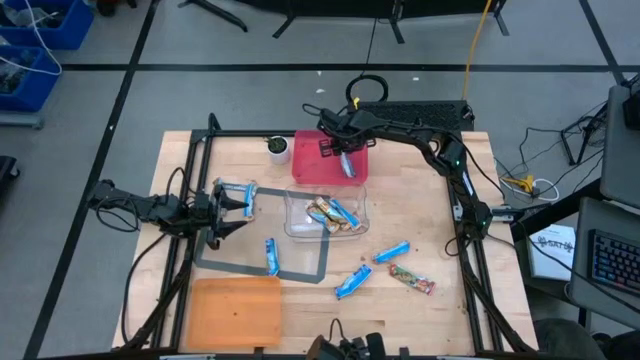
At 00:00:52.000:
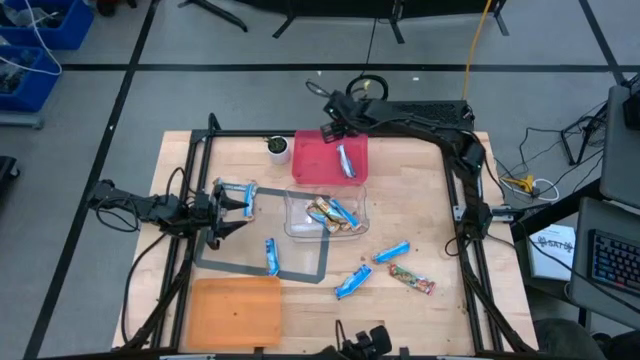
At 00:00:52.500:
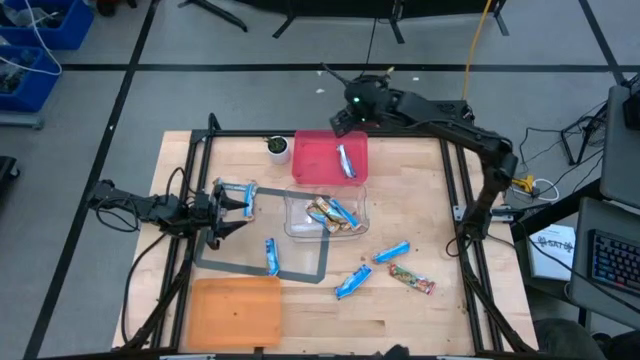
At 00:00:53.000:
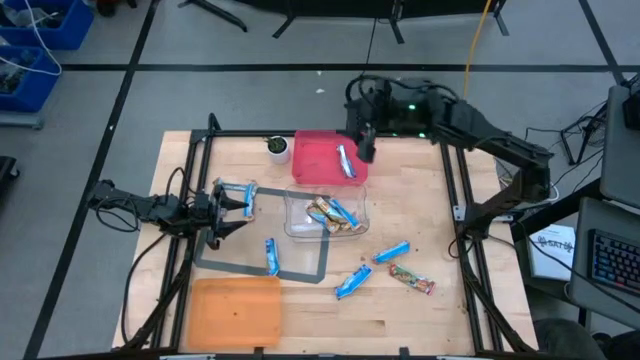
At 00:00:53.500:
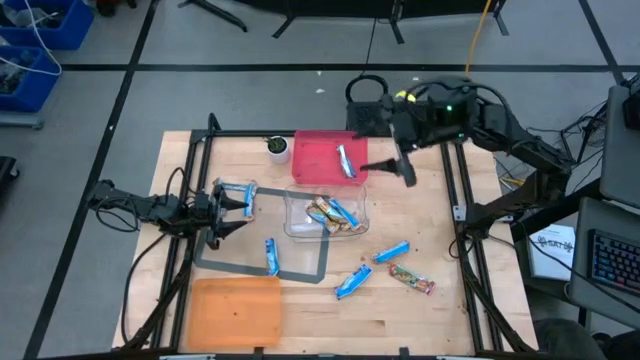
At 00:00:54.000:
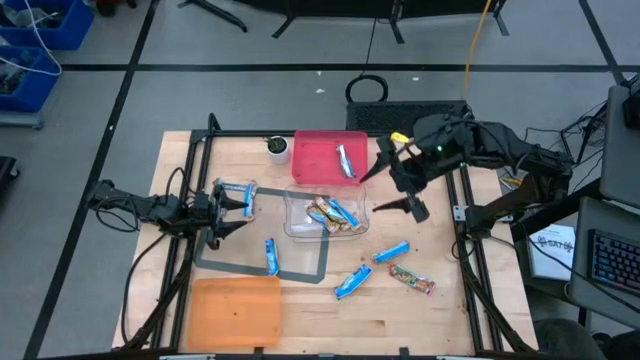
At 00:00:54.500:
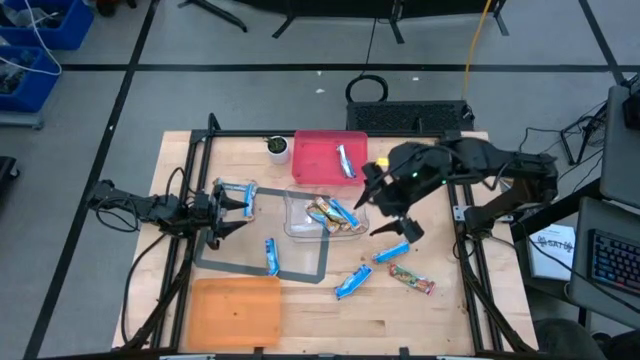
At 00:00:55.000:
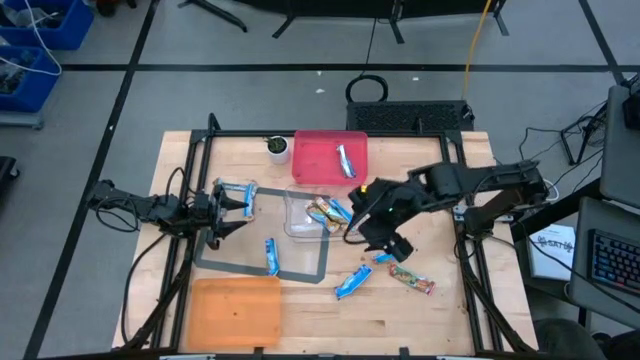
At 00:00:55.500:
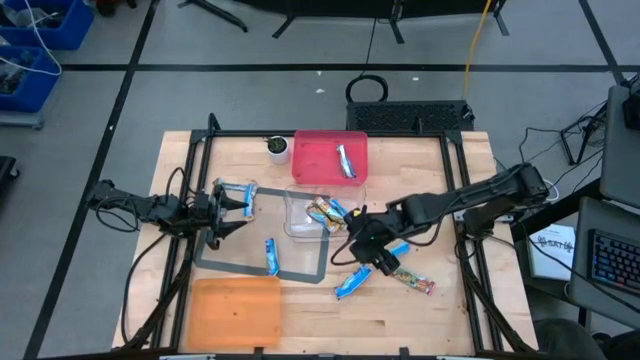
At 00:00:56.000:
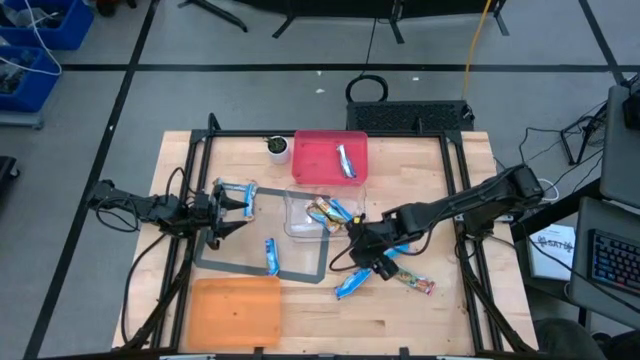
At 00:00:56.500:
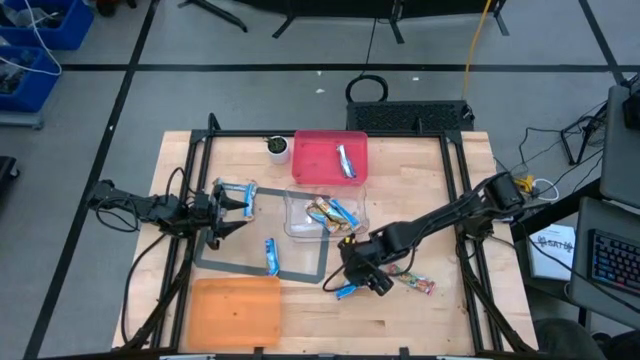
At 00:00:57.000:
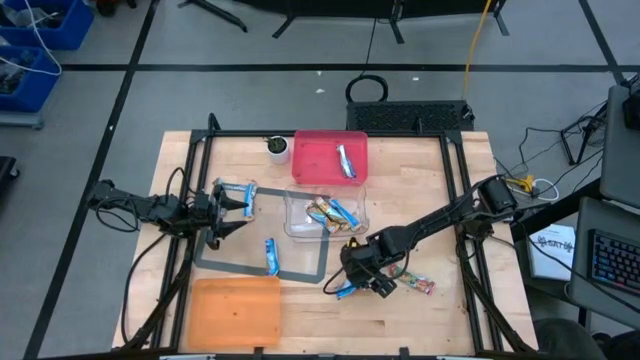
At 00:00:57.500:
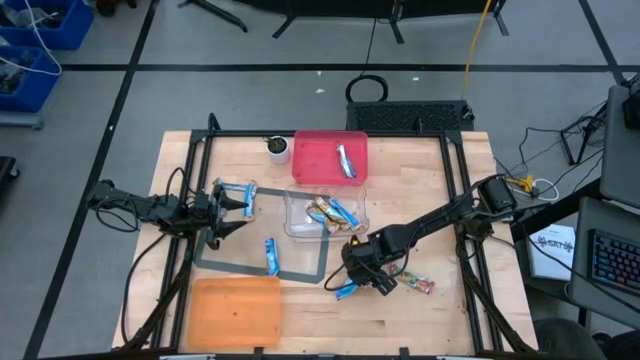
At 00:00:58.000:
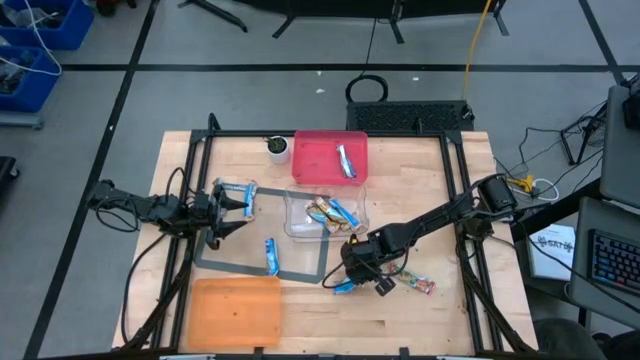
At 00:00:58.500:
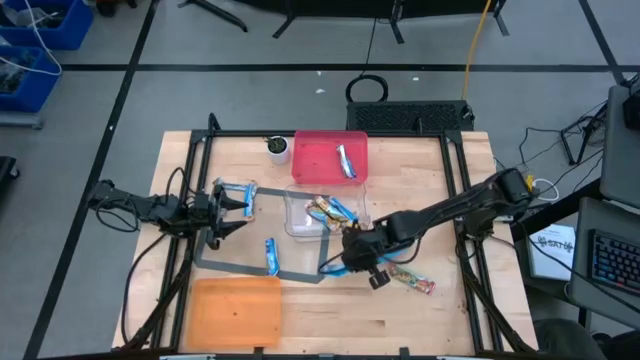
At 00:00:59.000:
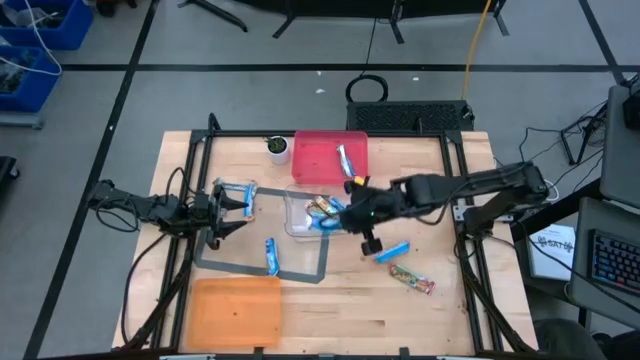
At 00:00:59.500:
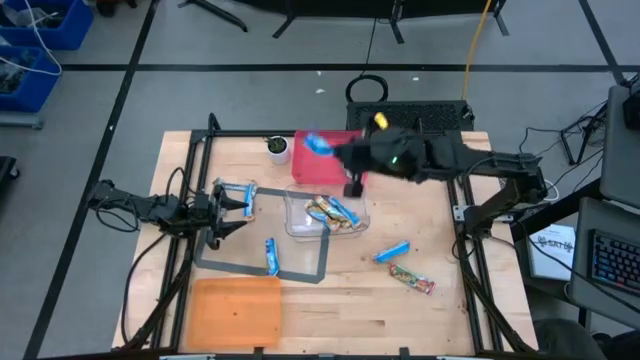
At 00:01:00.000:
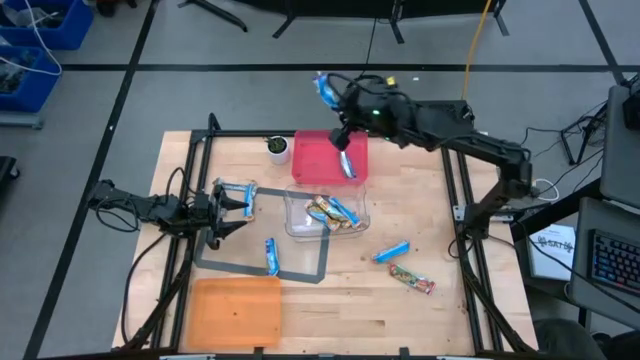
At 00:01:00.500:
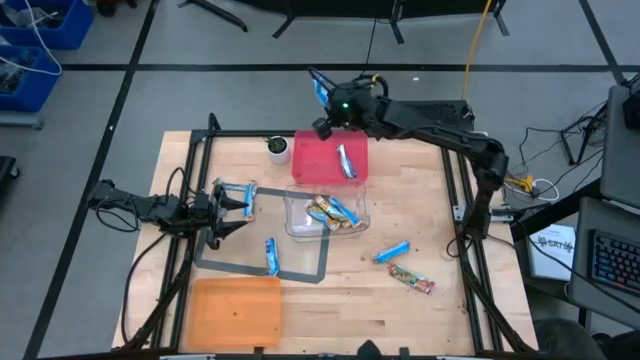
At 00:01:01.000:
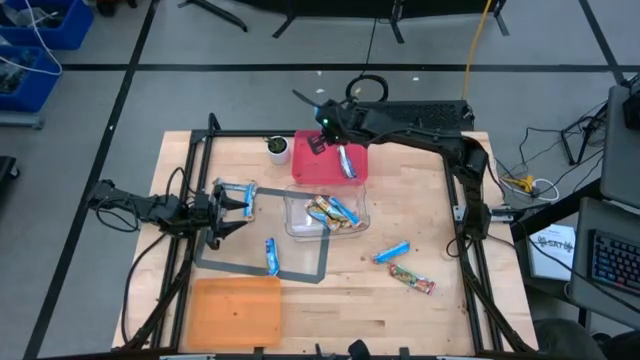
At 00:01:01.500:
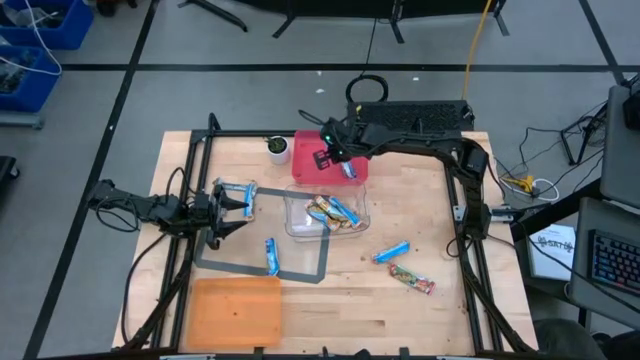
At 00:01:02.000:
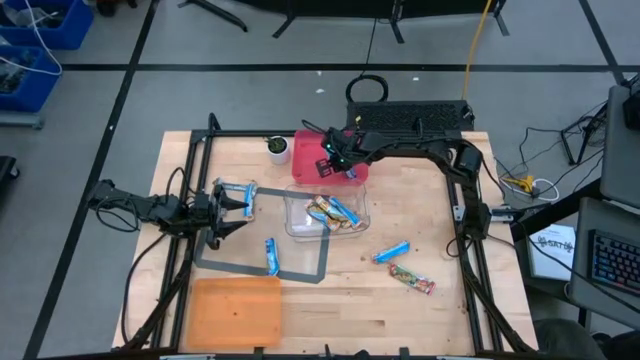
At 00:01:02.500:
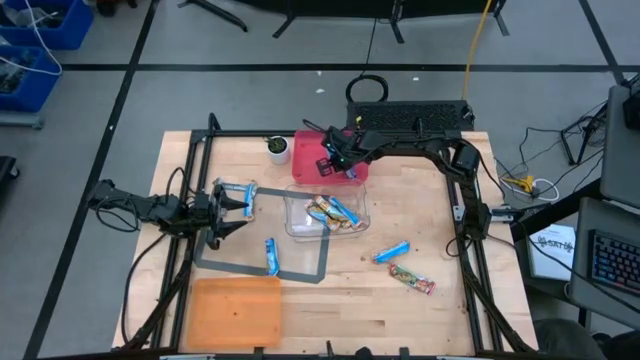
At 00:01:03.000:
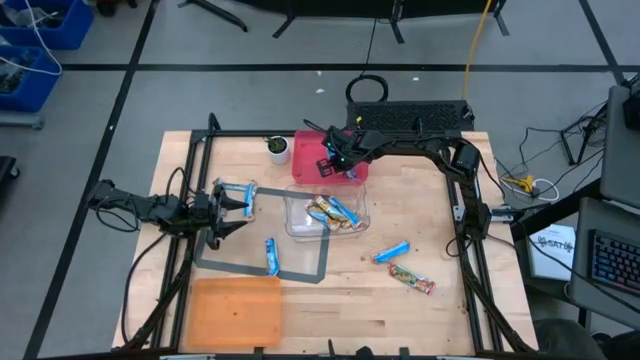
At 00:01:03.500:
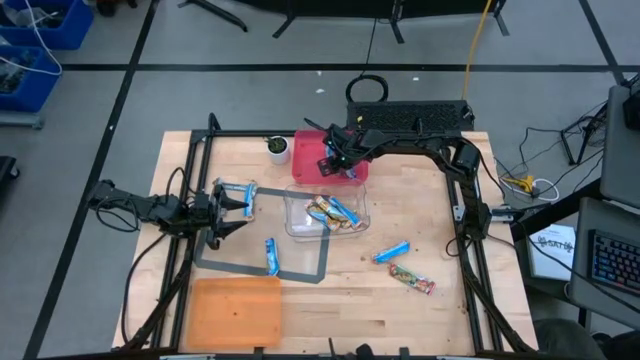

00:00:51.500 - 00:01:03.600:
Task: Pick and place Granola Bars by type
Put the bottom blue granola bar into the red bin

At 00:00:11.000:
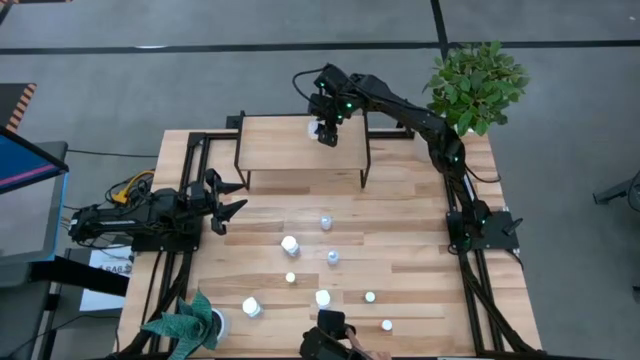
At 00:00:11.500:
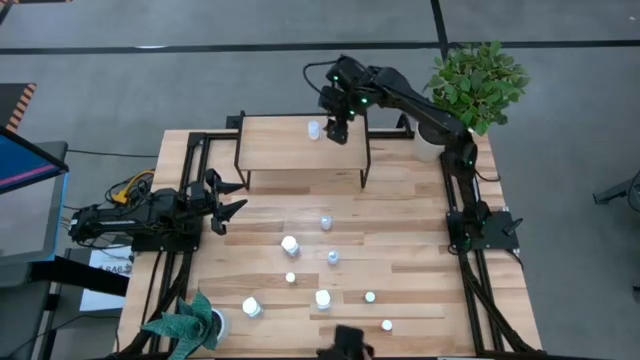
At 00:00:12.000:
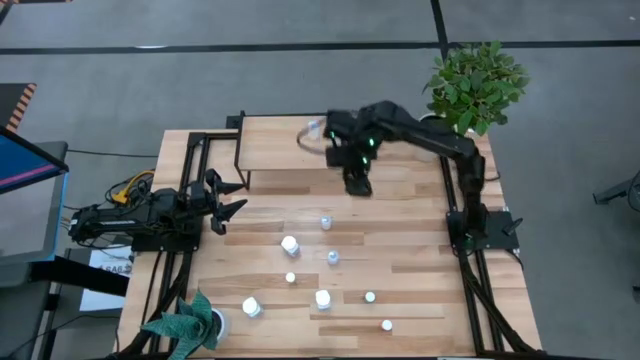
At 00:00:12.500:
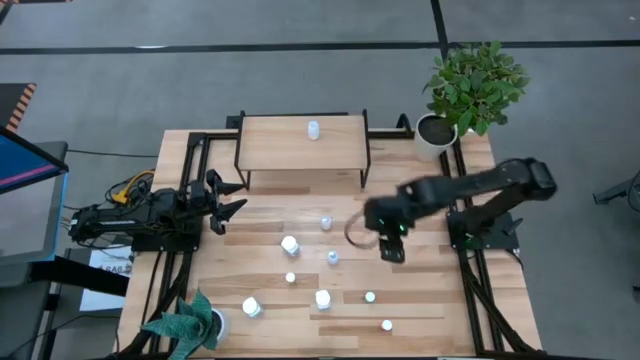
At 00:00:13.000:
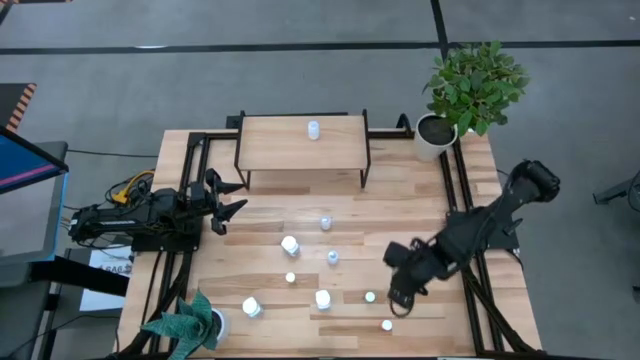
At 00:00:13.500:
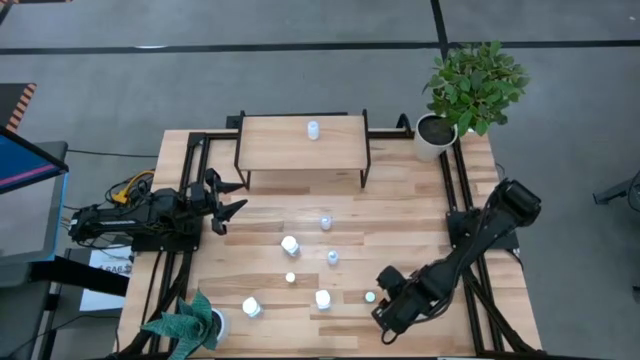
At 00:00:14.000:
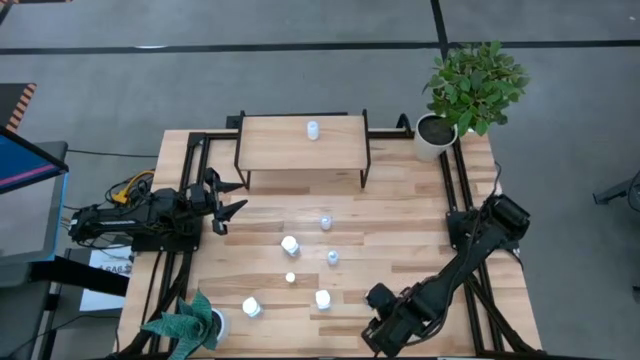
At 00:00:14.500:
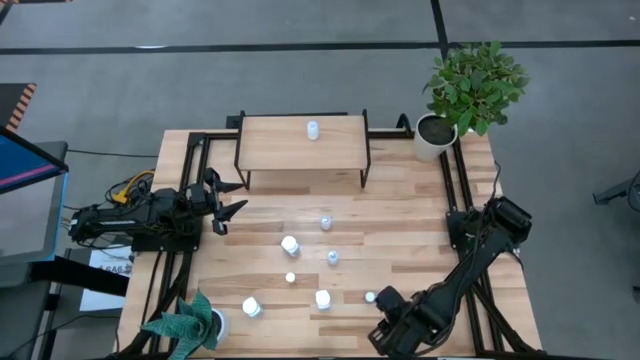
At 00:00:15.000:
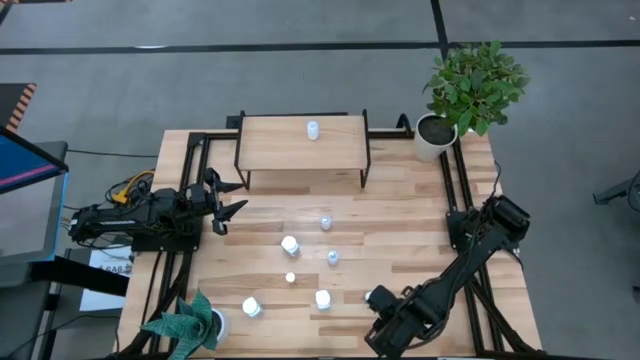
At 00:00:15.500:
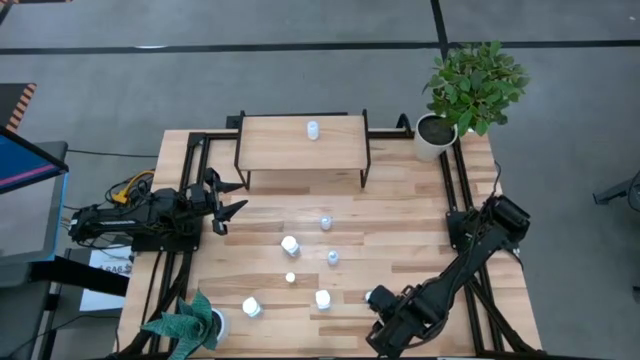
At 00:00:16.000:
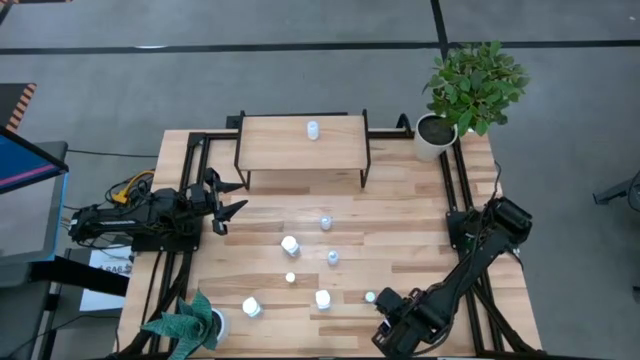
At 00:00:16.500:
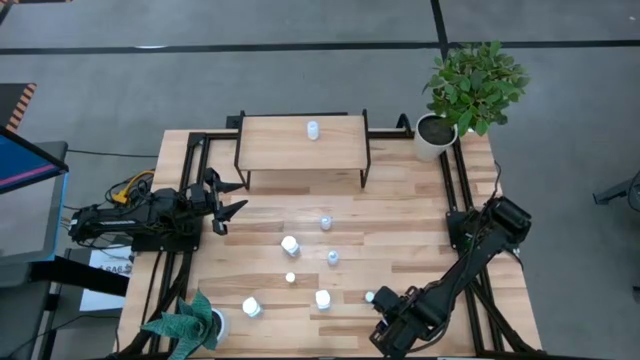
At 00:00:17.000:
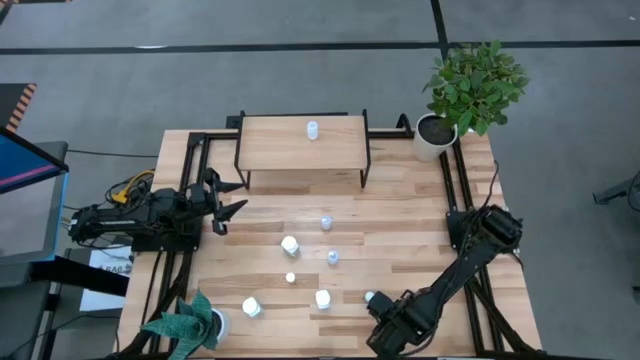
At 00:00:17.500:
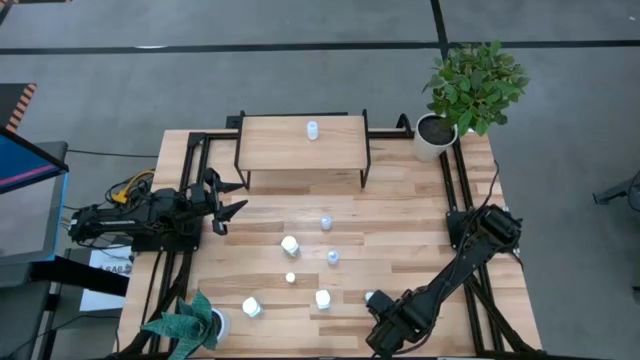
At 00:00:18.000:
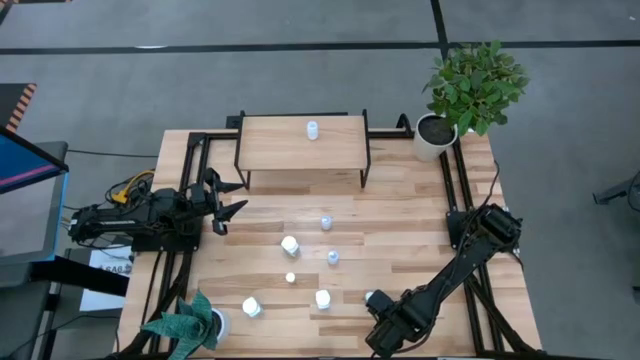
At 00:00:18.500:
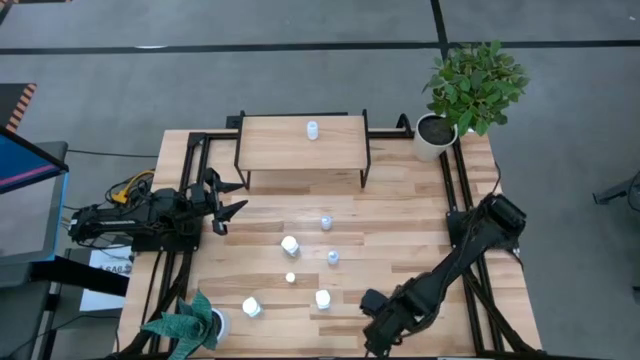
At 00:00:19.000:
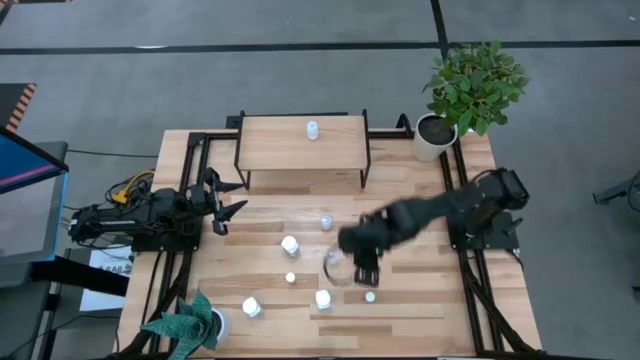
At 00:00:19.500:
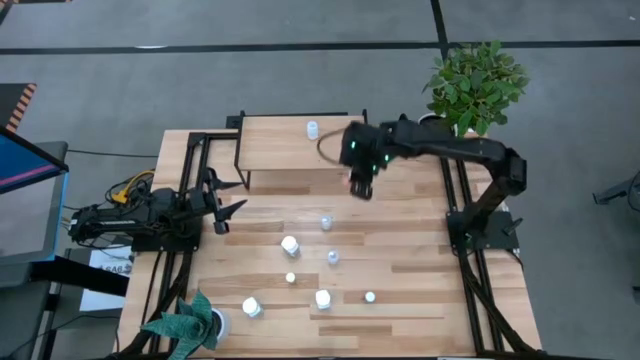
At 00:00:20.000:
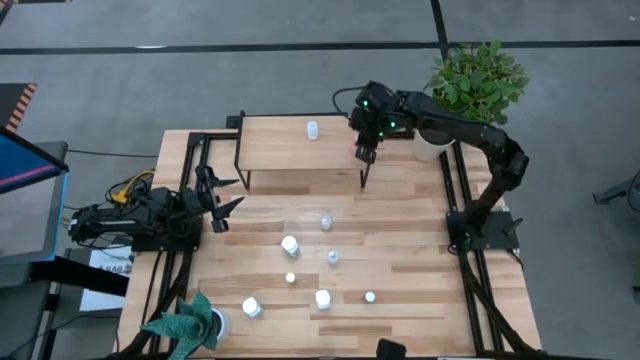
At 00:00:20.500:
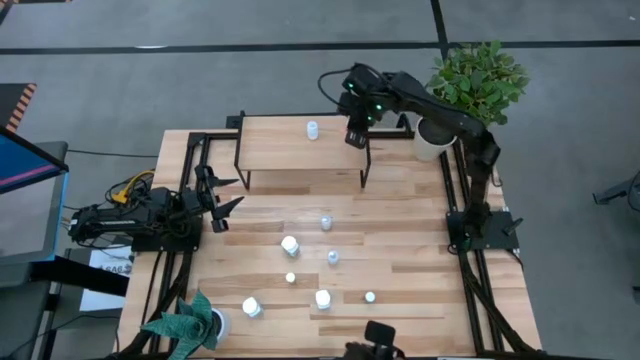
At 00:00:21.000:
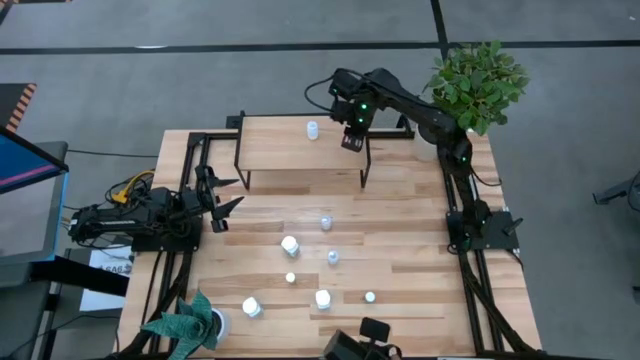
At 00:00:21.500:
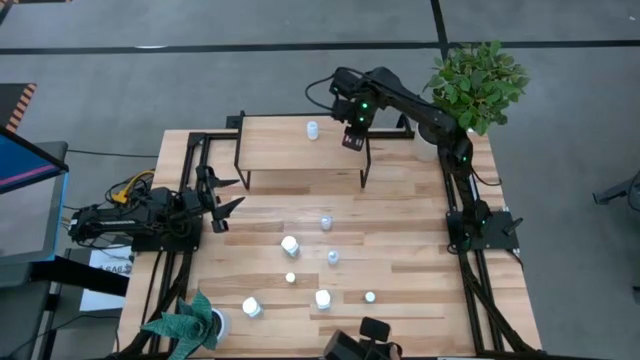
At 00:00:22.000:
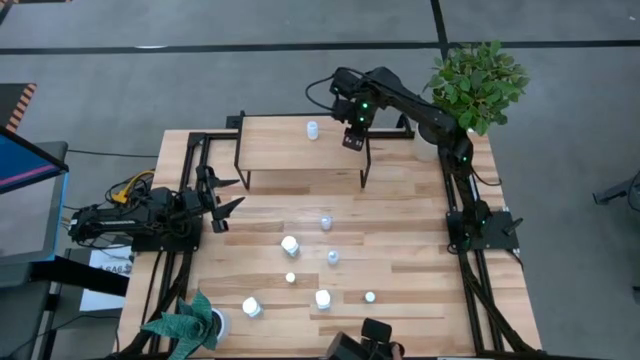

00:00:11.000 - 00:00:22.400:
Task: Pick and place medicine bottles onto shelf by color
Put the orange pill bottle on the shelf
